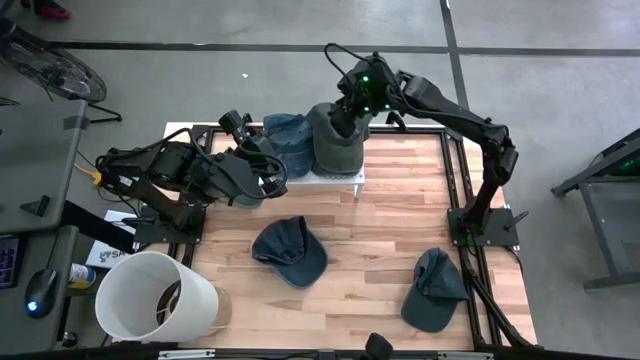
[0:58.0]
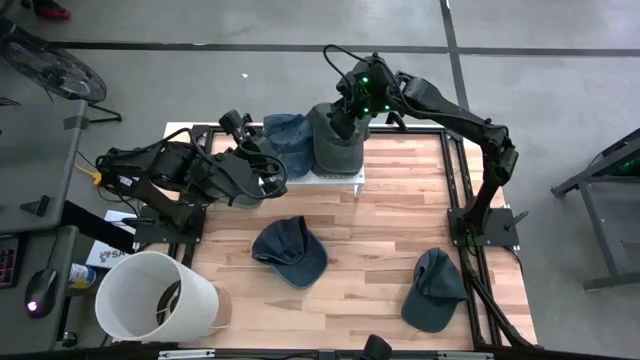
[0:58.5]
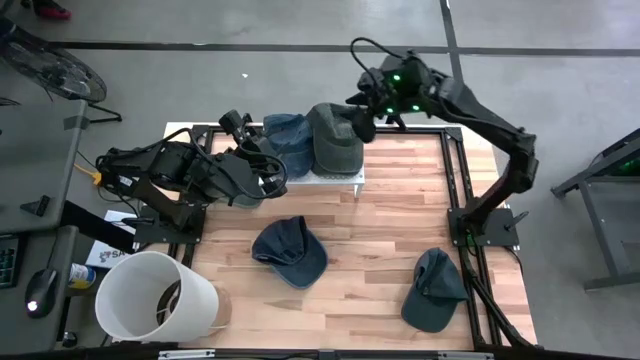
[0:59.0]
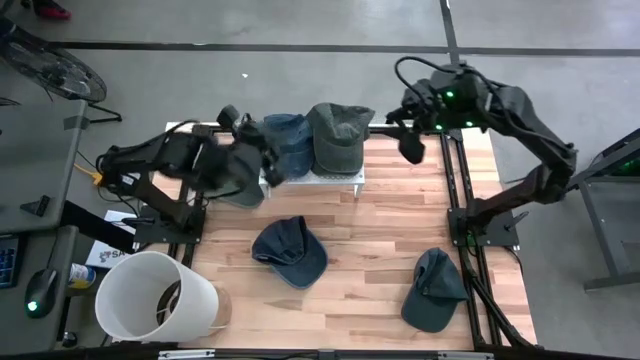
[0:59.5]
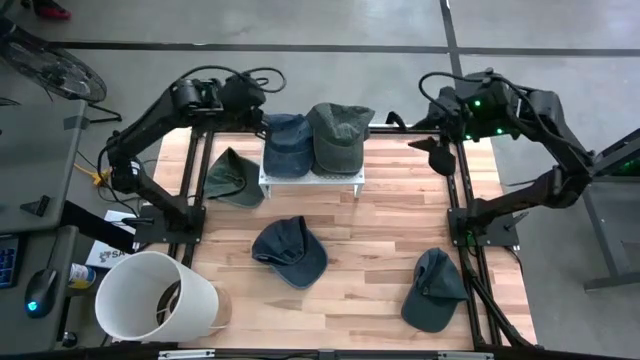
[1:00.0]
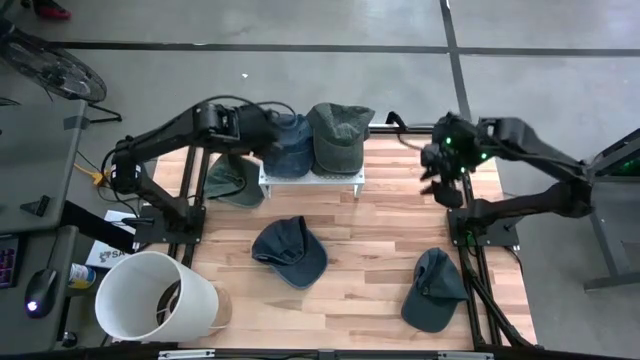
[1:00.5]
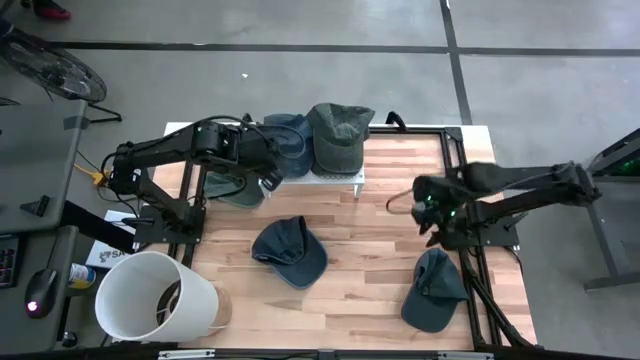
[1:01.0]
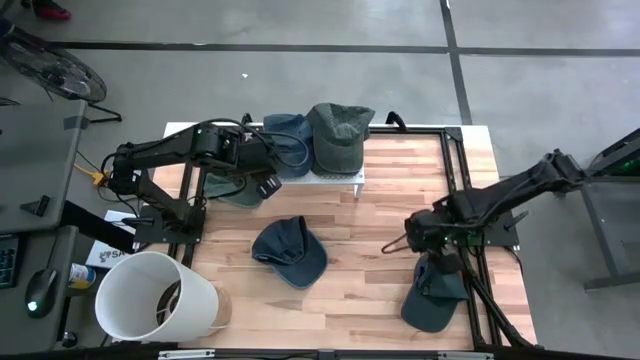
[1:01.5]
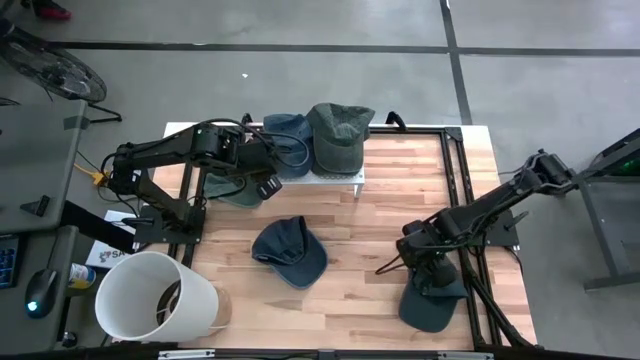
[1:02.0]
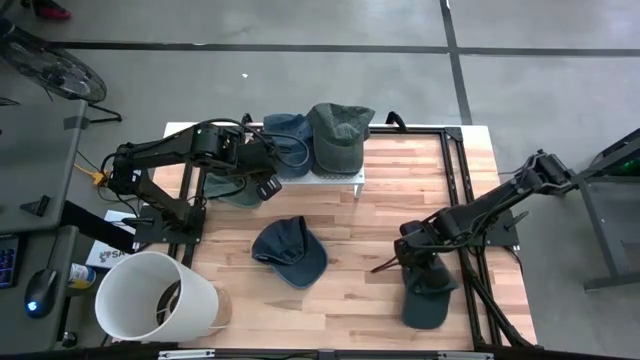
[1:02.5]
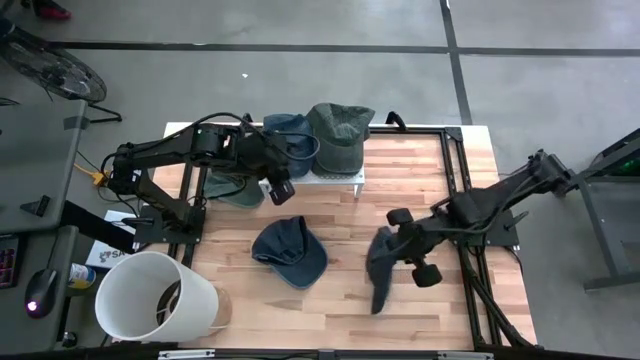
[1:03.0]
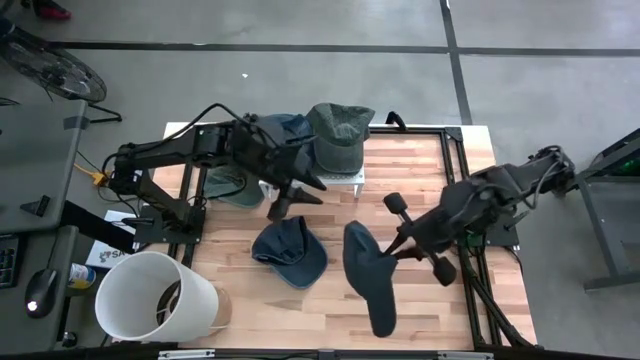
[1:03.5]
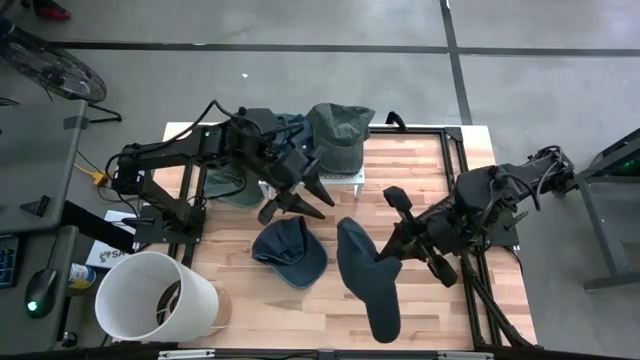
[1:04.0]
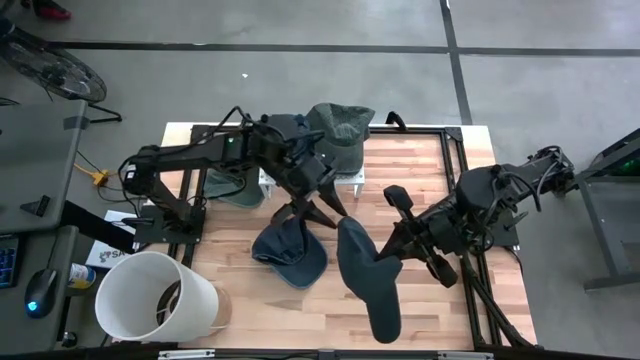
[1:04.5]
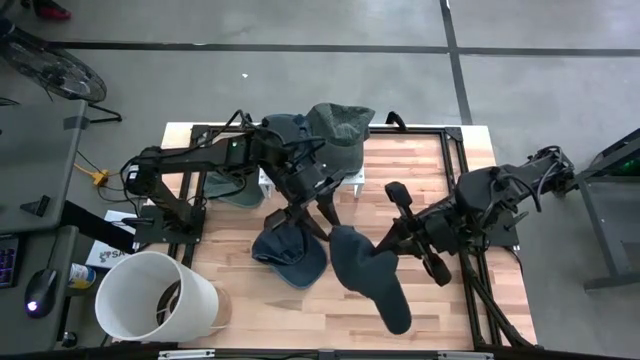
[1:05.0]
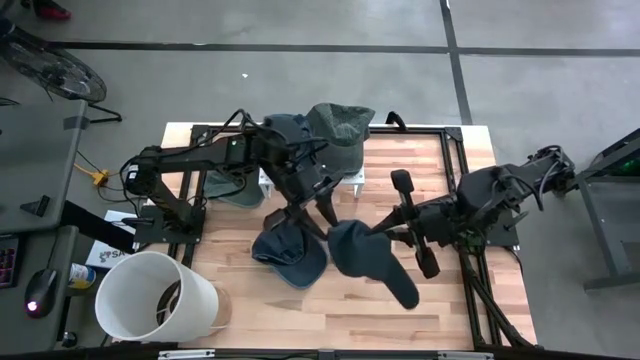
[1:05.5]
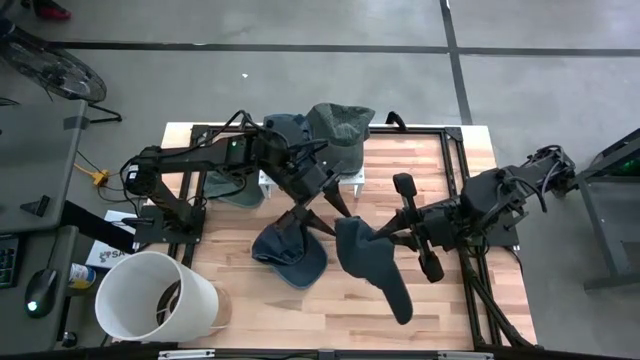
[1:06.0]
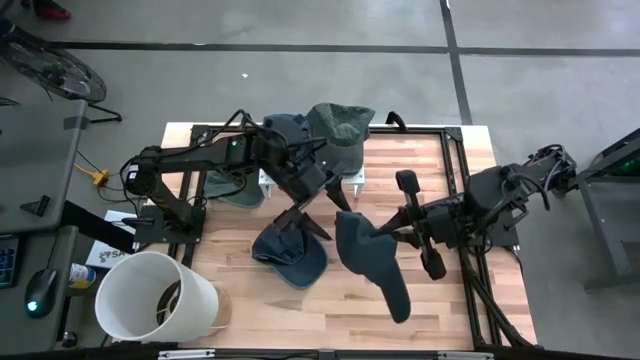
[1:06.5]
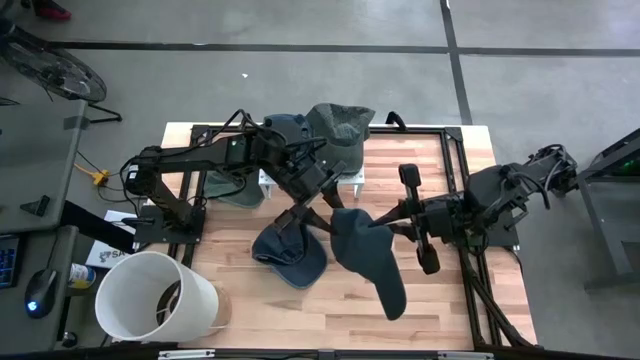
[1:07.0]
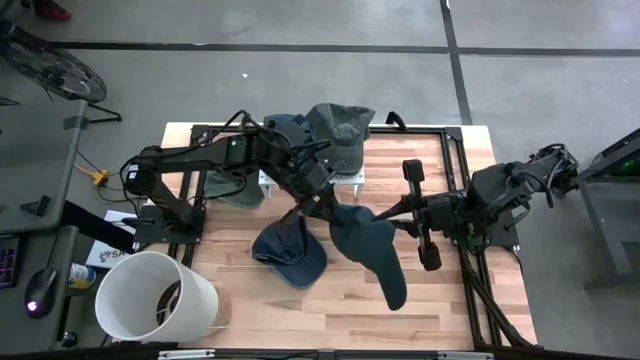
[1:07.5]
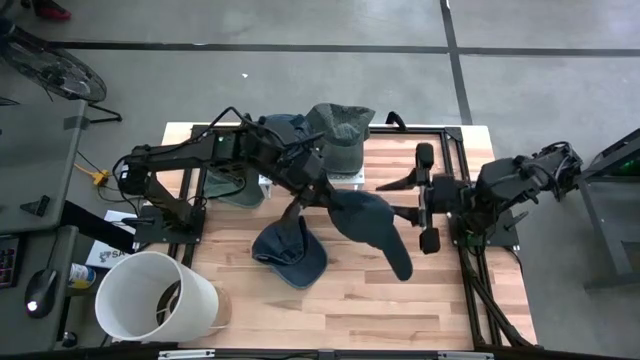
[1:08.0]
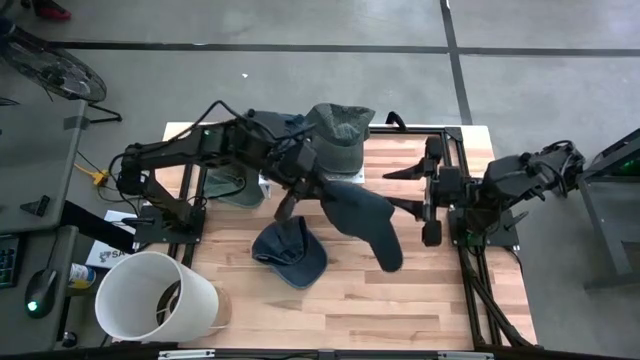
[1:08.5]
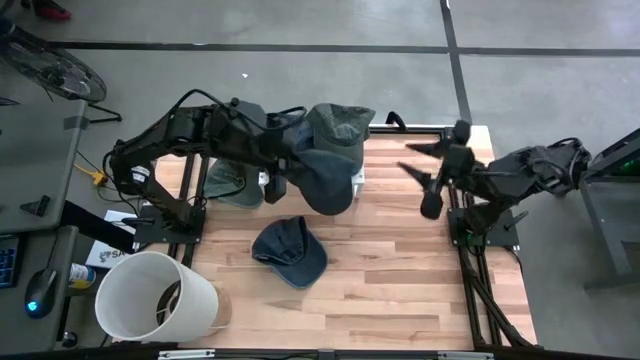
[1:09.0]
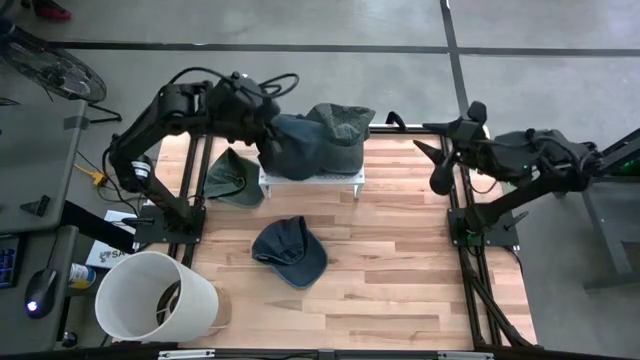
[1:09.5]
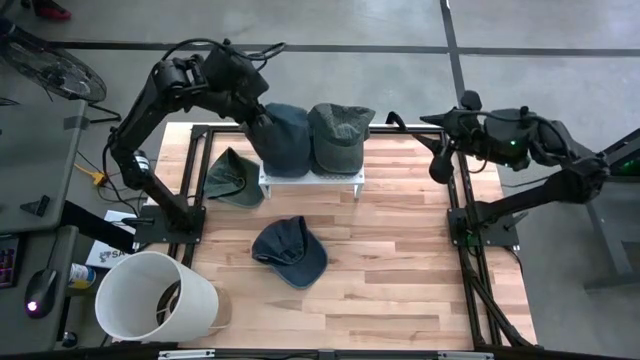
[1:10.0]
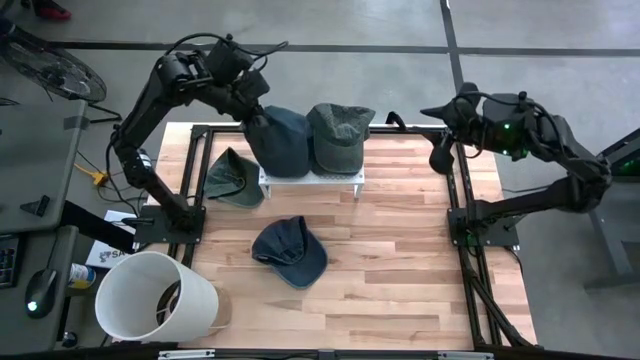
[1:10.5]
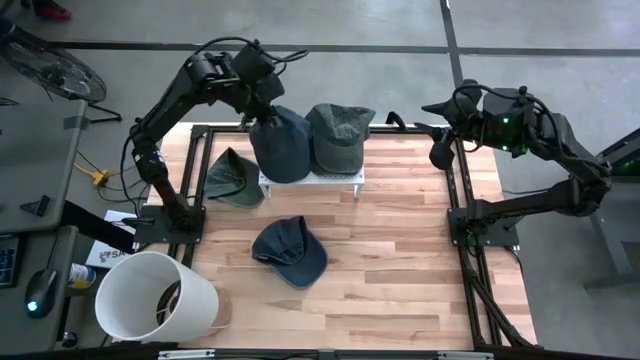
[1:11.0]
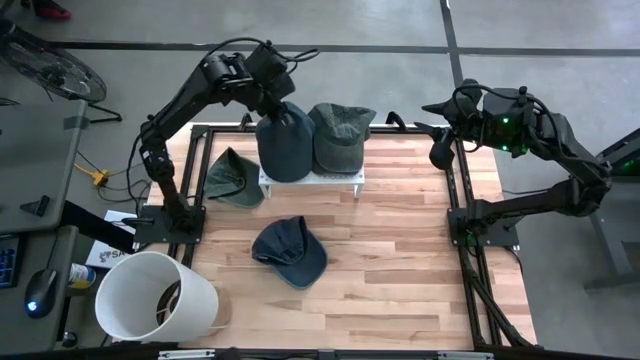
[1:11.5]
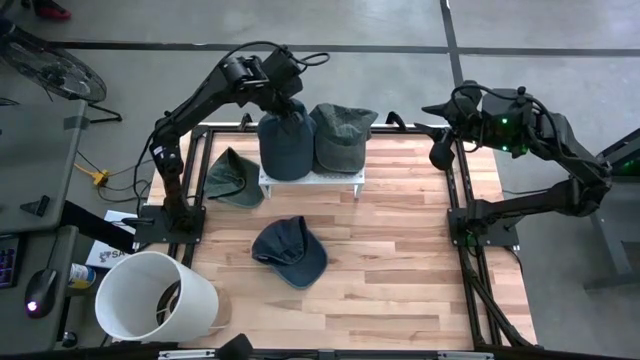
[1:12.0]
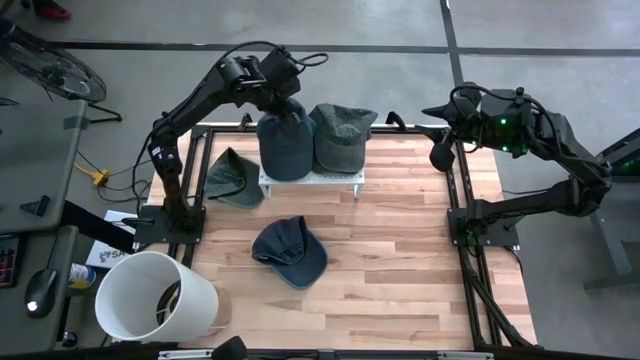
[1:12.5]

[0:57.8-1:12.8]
Task: Pick & Place hat
Stack the right blue cap on top of the other blue cap on the shelf

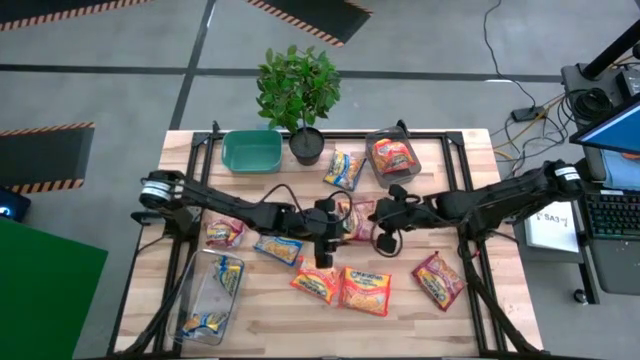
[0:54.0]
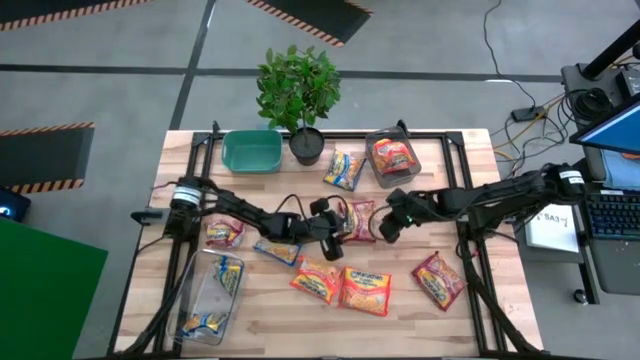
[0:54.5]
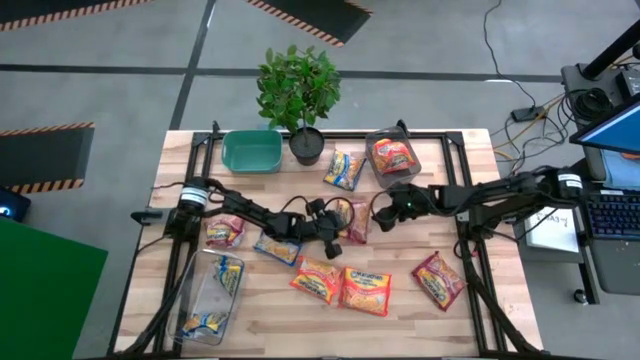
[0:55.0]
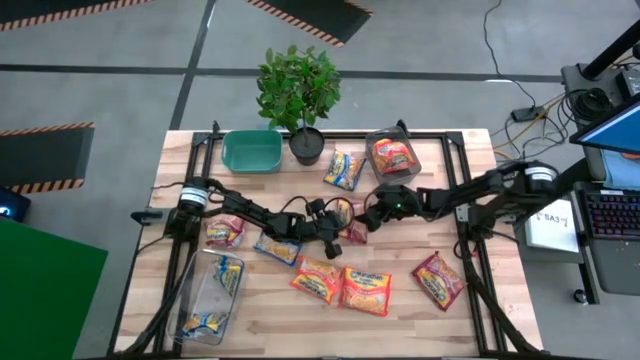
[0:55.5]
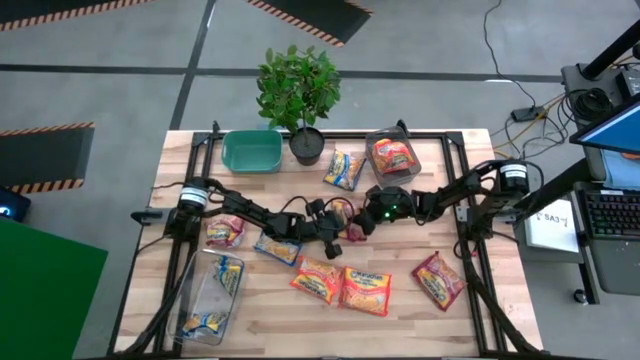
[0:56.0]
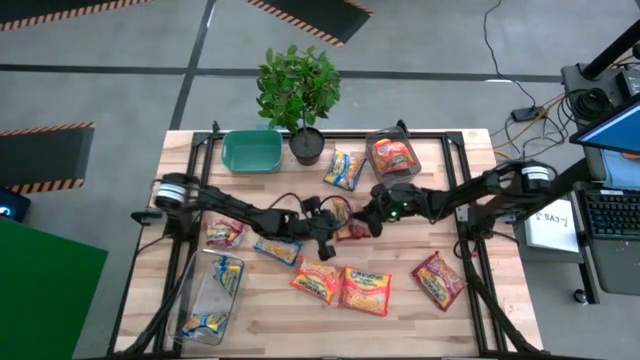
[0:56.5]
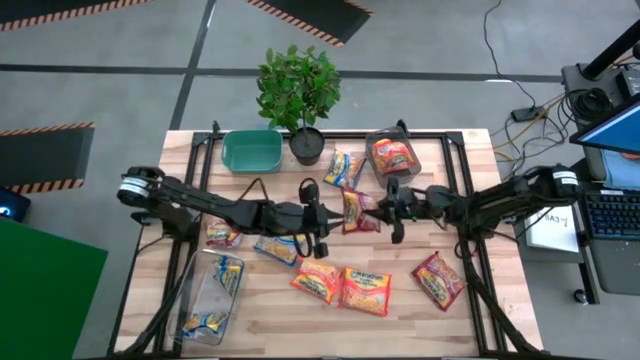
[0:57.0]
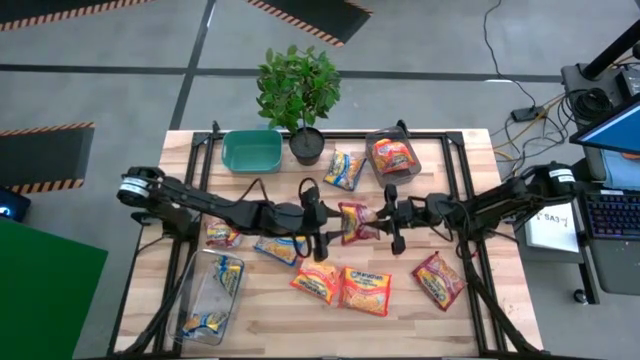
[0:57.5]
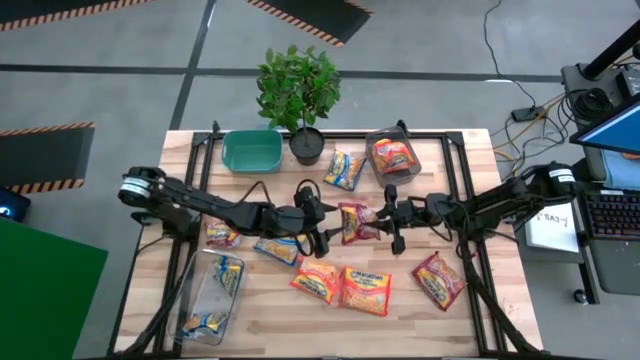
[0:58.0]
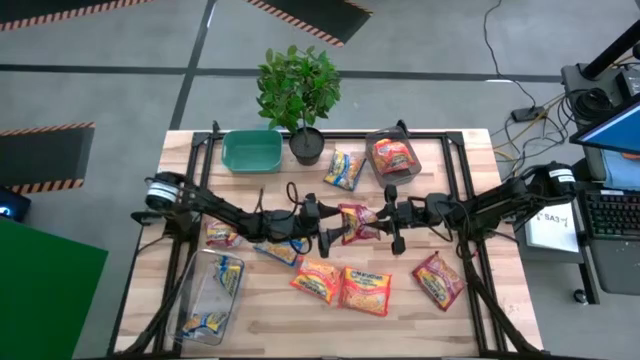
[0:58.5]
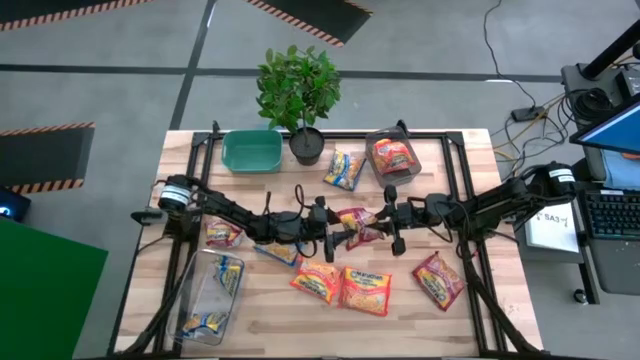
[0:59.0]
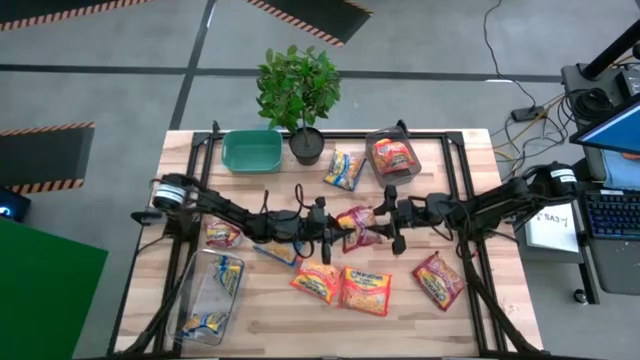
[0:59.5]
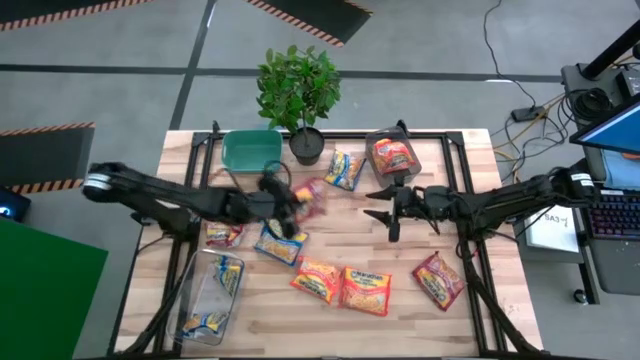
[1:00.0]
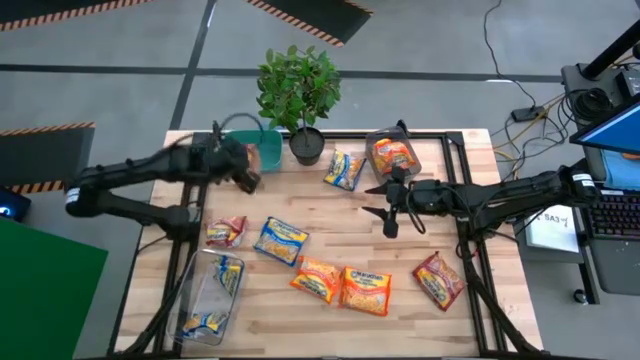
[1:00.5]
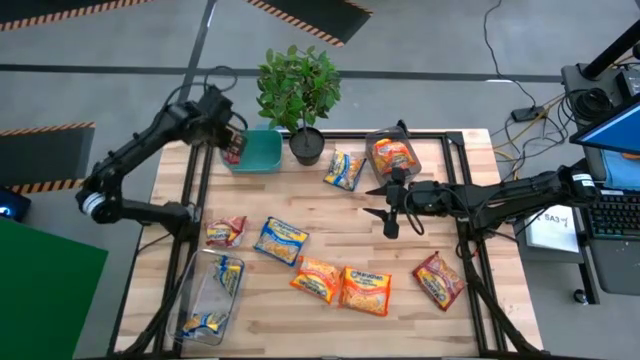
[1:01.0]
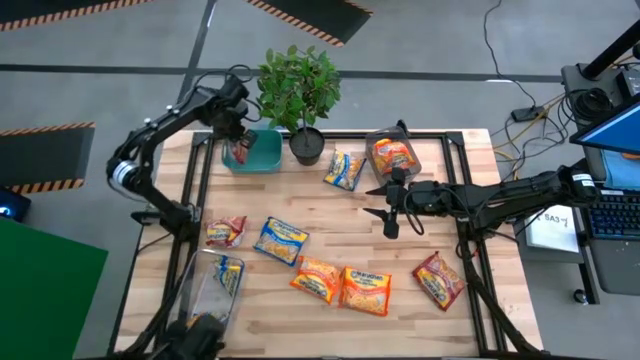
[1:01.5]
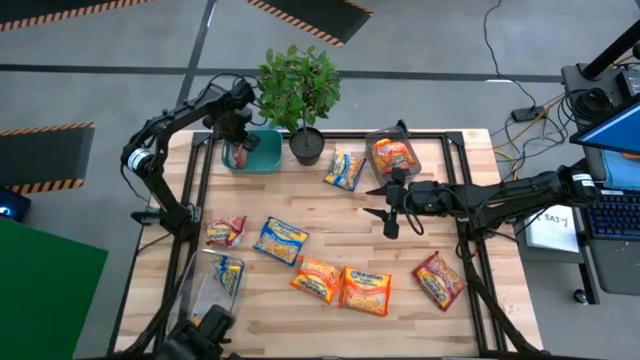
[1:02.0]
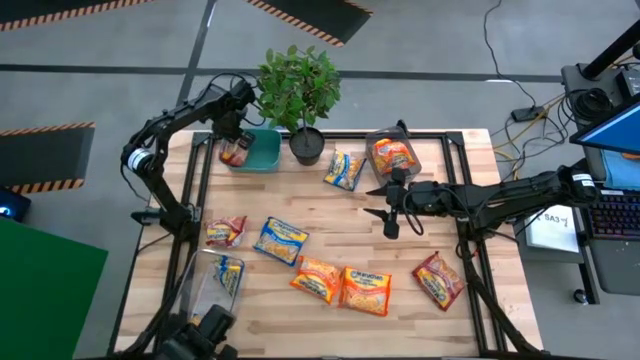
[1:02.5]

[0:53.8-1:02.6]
Task: Sort Maruchan noodles
Put the red noodle pack into the green bin
